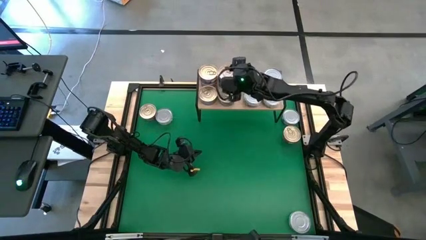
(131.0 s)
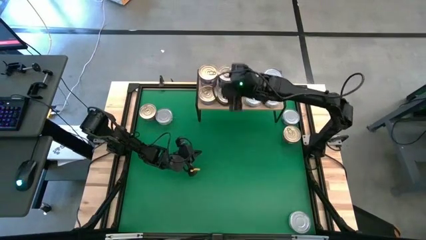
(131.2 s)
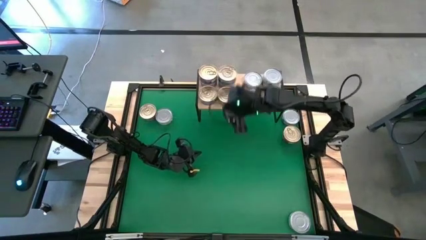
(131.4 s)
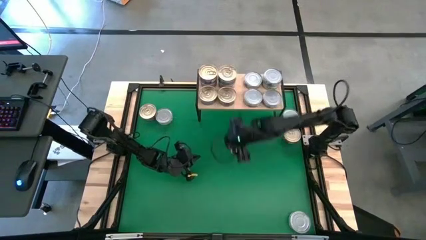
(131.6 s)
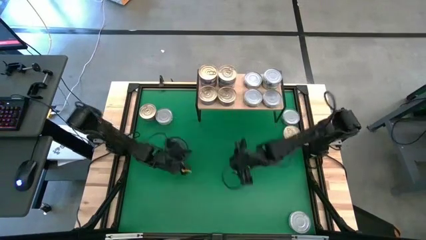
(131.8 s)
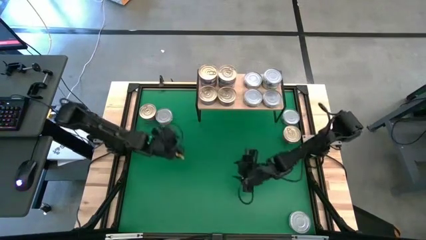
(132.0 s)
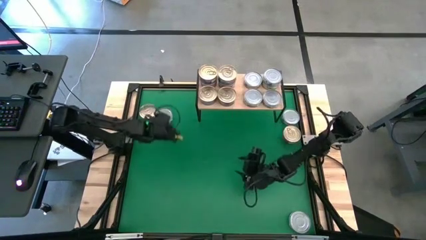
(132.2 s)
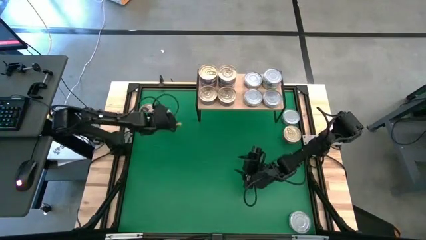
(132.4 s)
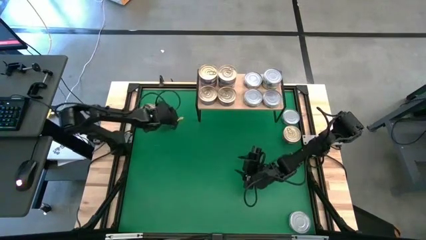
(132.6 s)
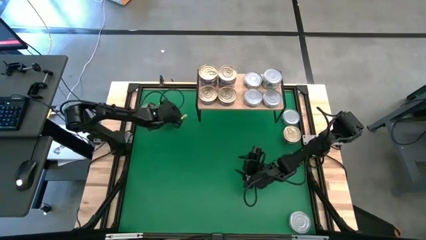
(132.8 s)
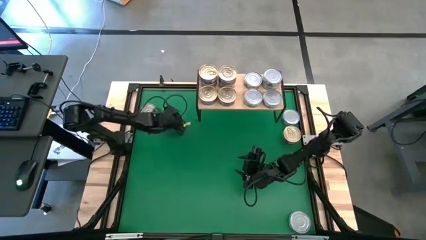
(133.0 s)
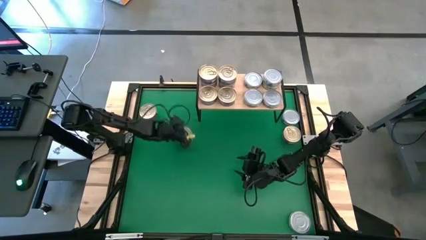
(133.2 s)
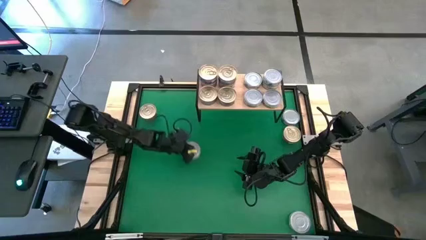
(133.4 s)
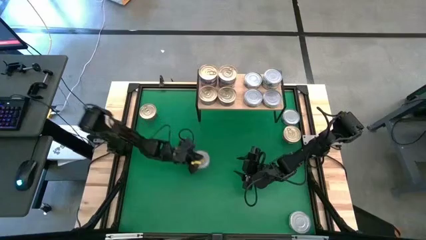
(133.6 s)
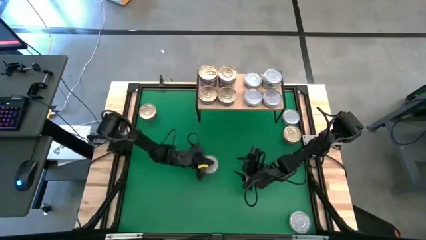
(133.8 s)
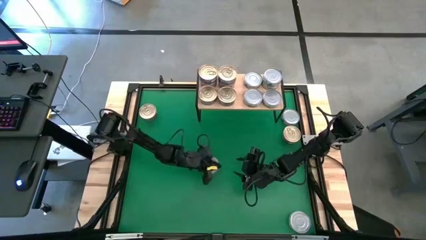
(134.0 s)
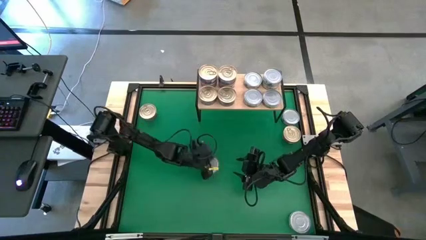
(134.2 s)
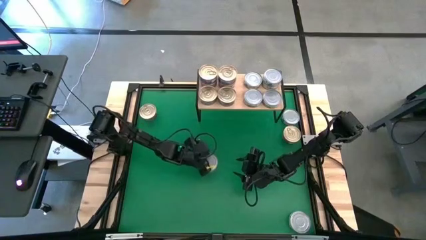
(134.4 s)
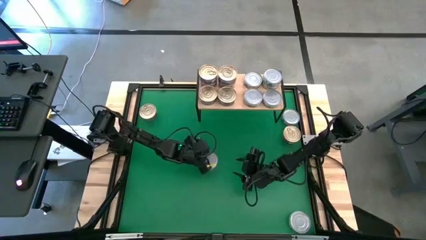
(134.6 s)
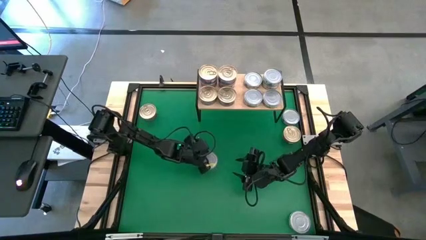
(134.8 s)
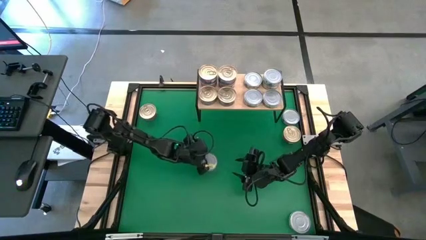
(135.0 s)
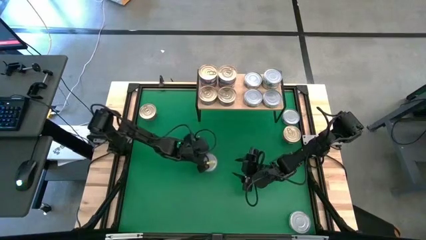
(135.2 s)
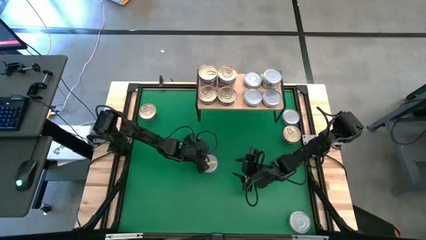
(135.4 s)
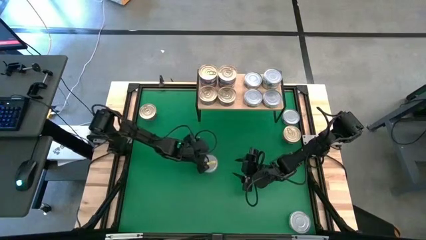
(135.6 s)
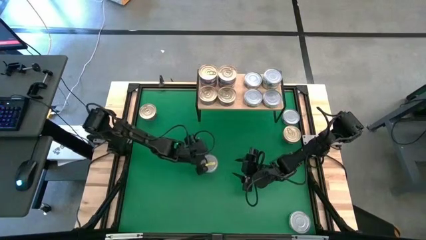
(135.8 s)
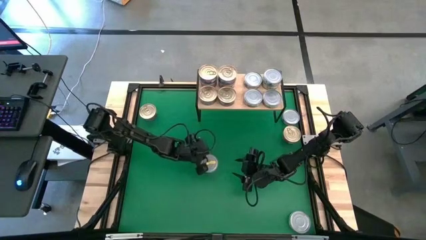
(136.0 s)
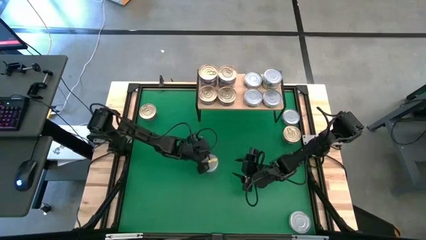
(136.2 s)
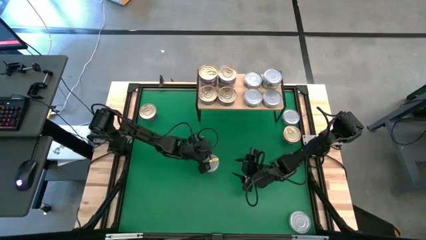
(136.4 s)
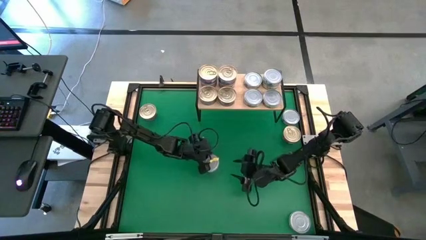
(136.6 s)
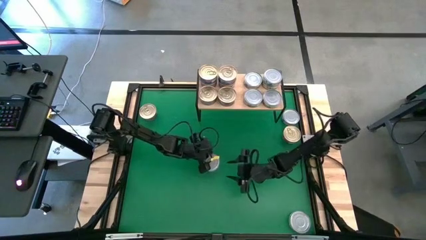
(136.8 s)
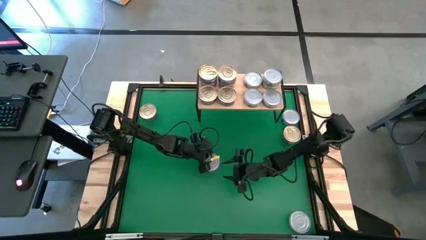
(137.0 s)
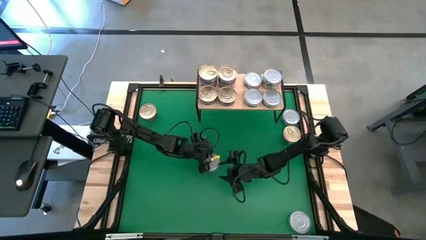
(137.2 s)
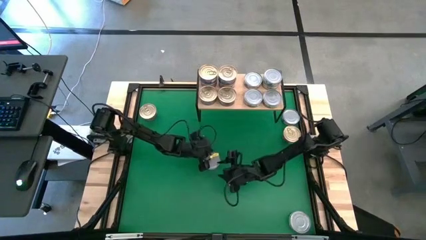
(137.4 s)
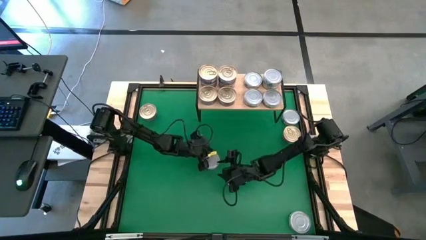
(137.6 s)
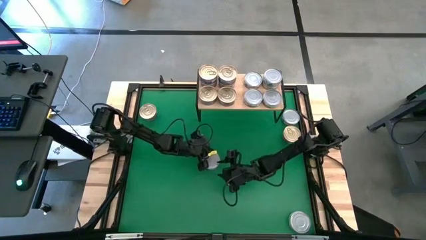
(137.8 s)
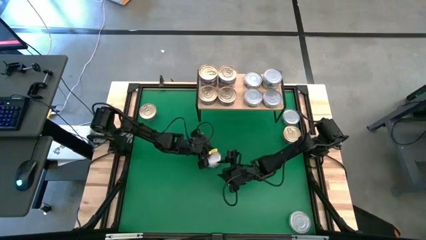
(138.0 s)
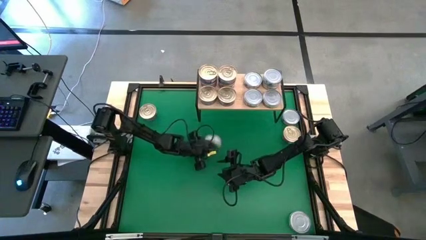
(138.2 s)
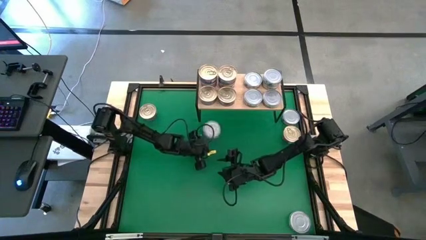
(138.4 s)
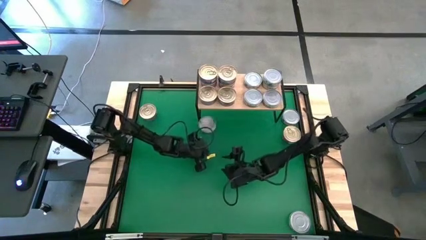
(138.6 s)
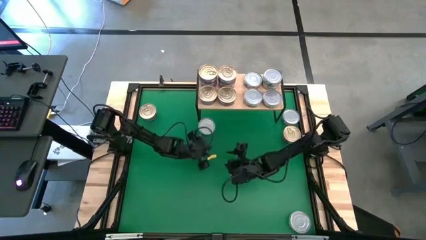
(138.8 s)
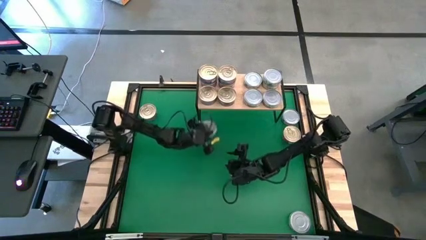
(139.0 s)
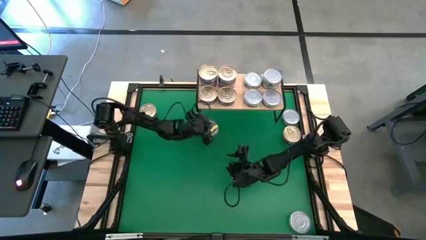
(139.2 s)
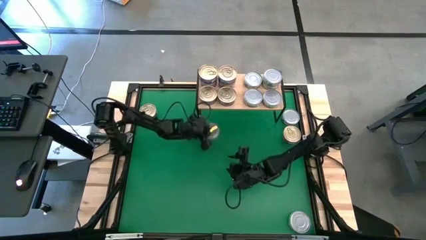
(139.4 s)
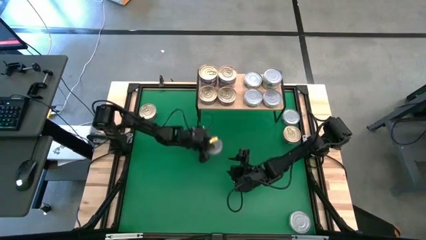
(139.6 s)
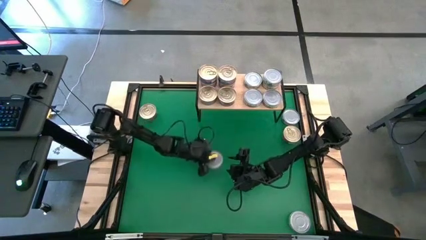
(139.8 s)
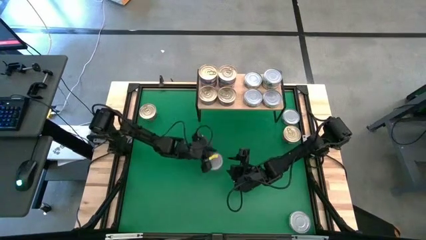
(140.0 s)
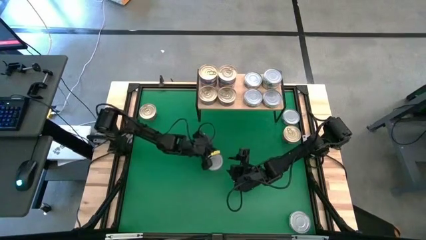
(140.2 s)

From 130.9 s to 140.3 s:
Task: Stack canned seafood by type on shelf
Stack the green tuna can on top of the green tuna can on the shelf

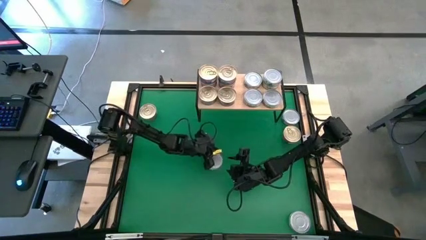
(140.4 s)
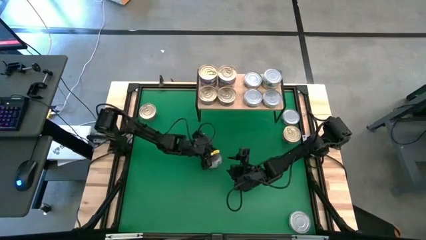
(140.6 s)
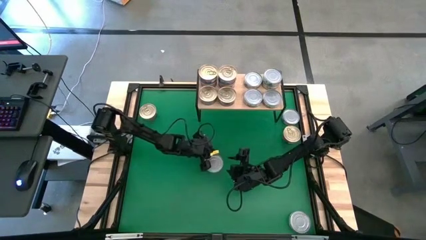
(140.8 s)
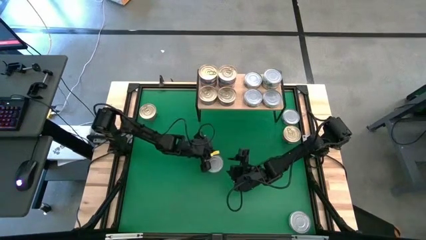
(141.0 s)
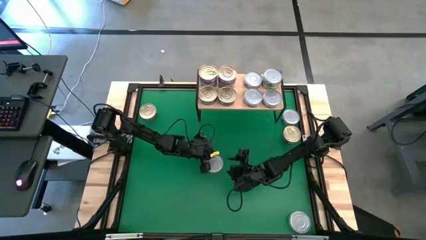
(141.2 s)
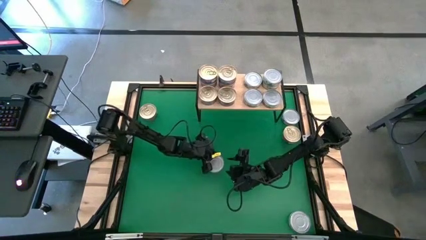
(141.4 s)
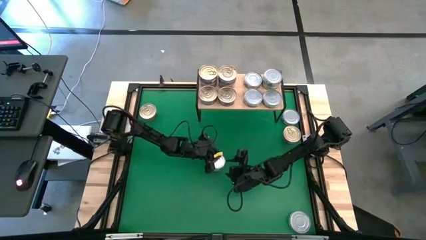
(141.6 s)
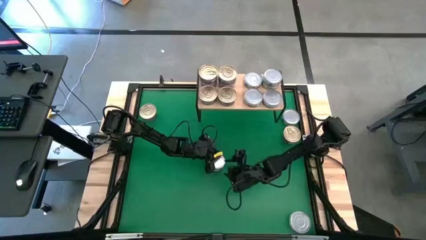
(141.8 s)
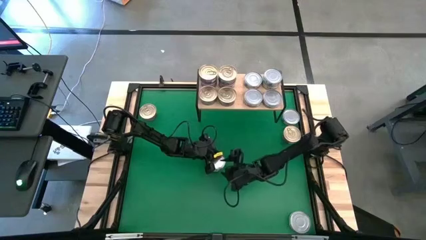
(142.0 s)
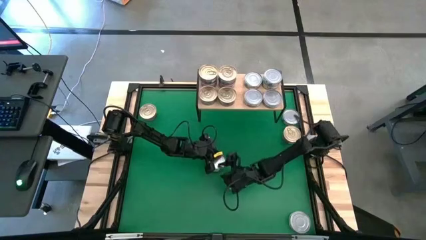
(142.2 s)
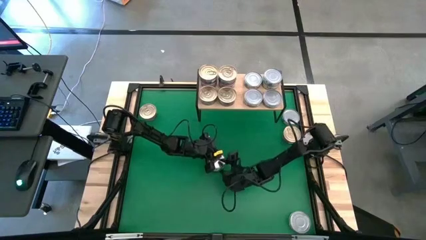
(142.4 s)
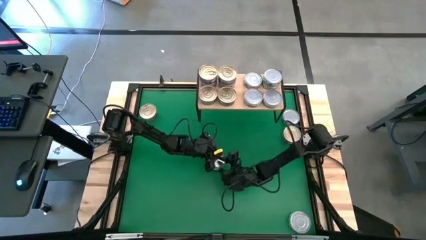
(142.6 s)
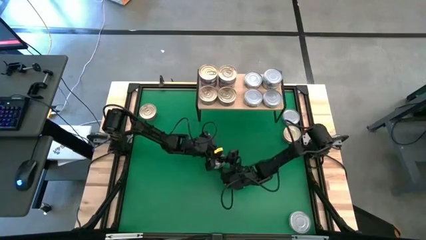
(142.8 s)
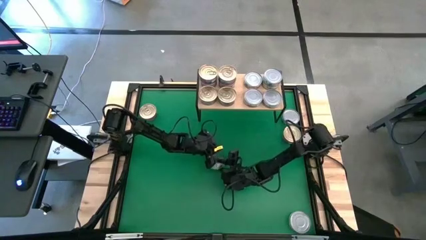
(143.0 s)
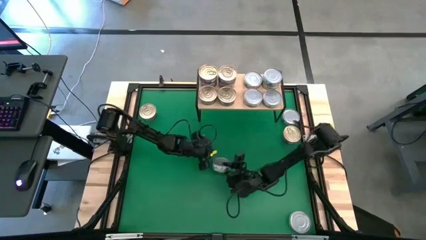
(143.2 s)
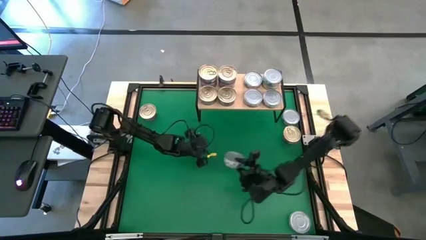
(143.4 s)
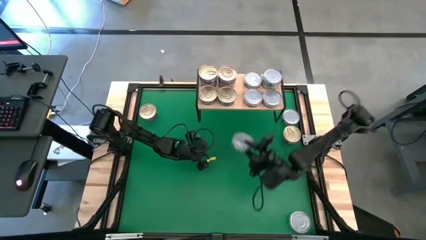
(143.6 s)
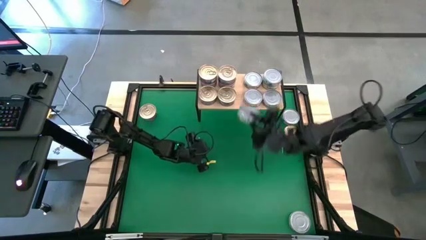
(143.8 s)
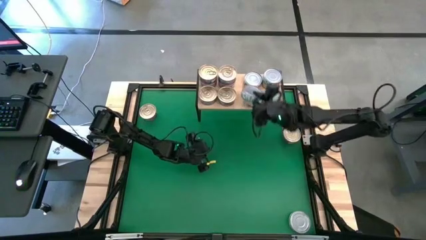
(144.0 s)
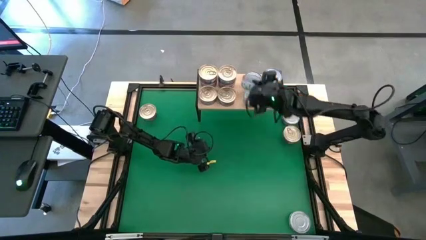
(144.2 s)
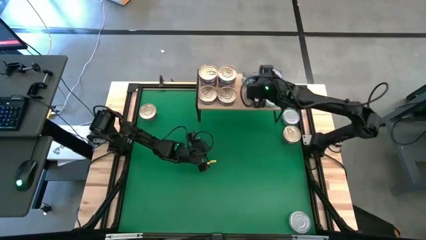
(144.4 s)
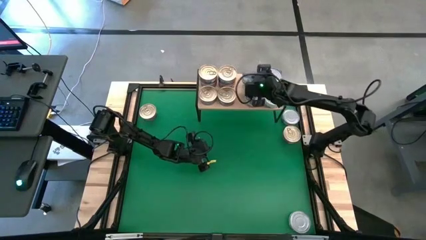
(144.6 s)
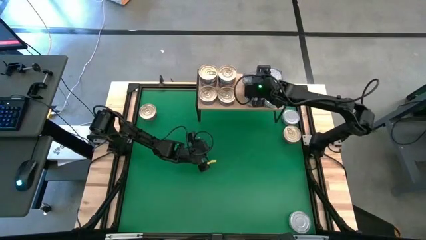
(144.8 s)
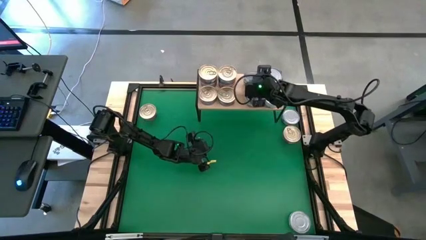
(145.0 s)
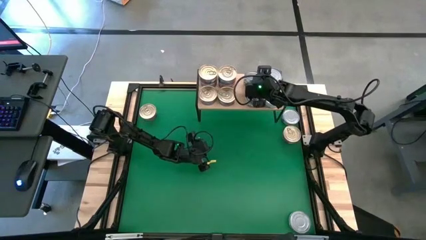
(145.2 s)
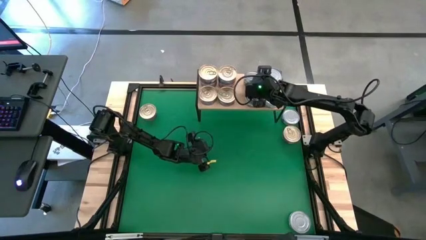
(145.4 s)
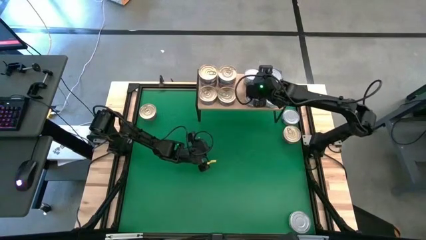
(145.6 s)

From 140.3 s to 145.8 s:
Stack the green tuna can on top of the green tuna can on the shelf

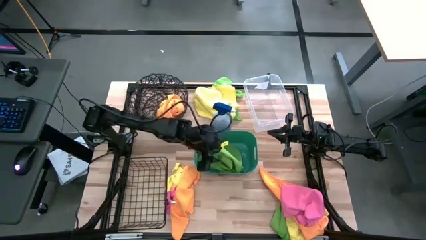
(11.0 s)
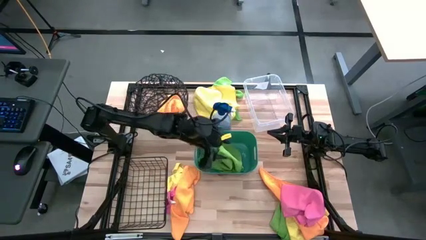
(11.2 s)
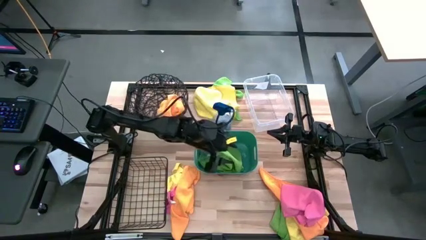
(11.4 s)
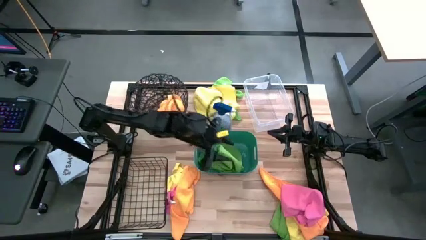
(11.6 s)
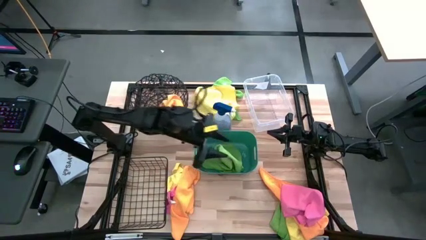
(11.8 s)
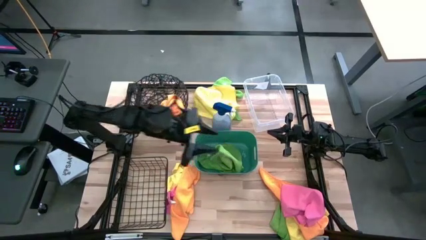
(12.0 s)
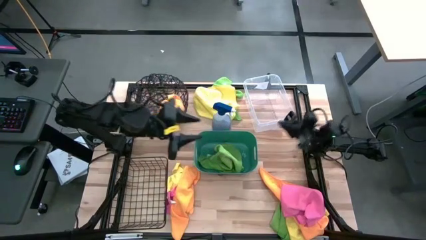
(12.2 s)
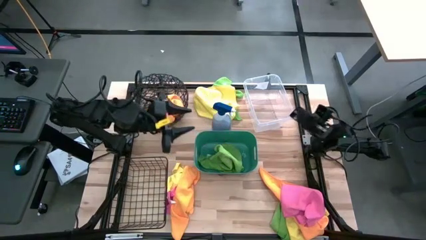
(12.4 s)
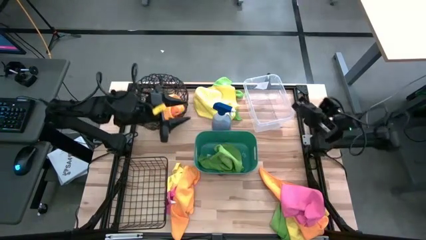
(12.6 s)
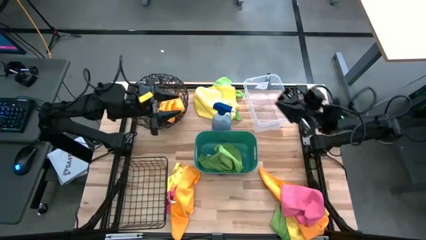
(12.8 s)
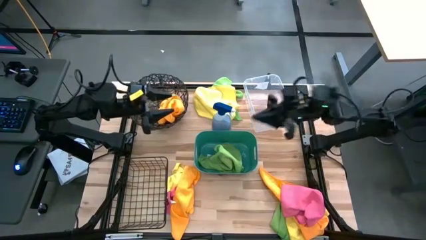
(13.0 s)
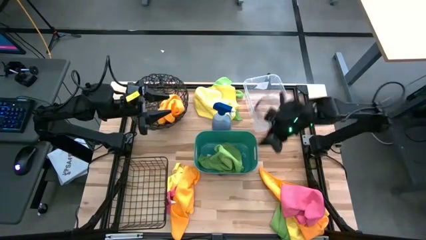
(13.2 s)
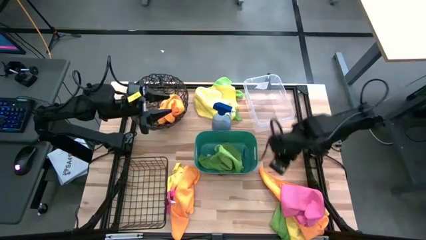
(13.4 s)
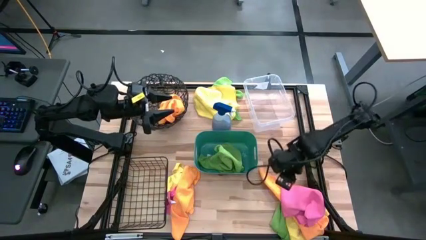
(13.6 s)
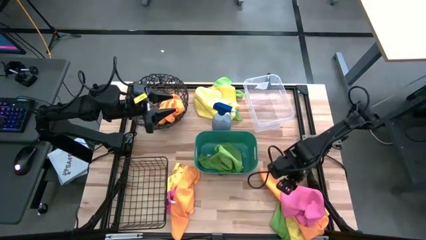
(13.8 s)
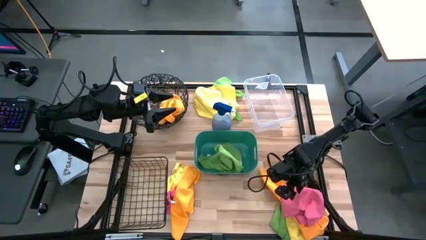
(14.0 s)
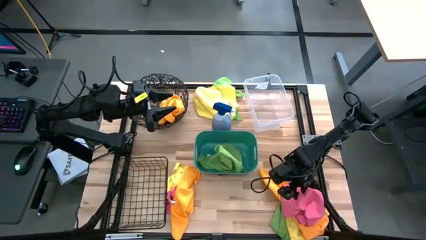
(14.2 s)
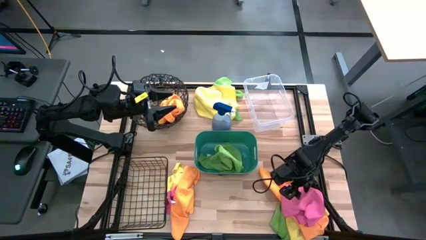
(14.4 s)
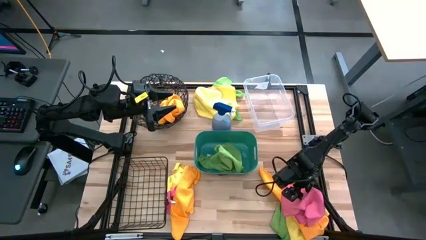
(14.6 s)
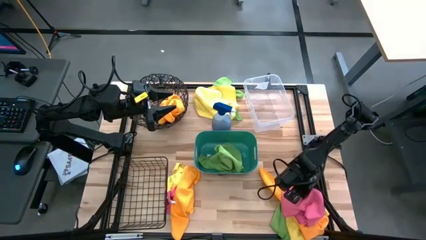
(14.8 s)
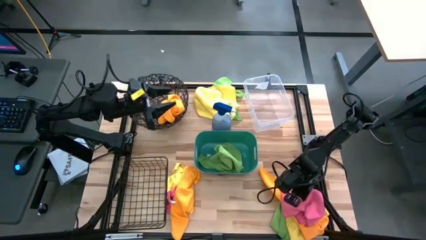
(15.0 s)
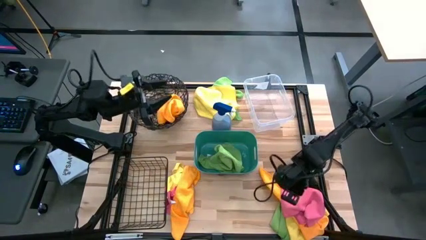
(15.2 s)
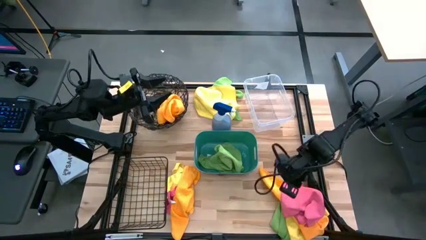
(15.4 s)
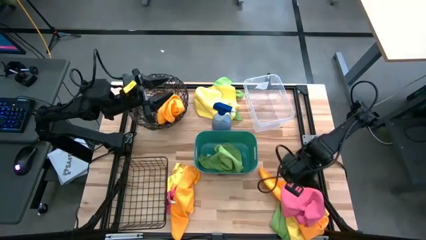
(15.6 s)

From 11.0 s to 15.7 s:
Task: Sort microfiber towel by color & place in baskets
Put the pink towel into the transparent bin
